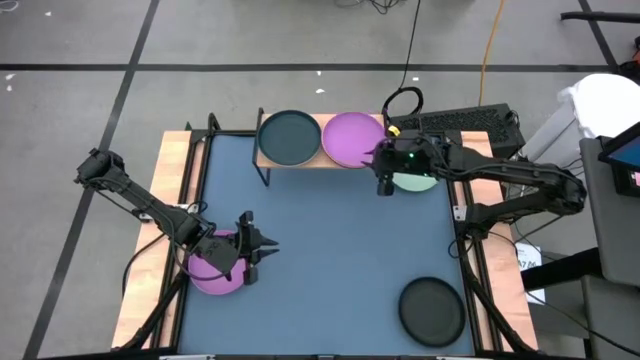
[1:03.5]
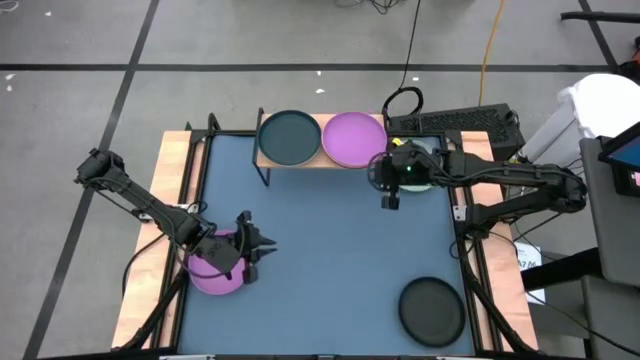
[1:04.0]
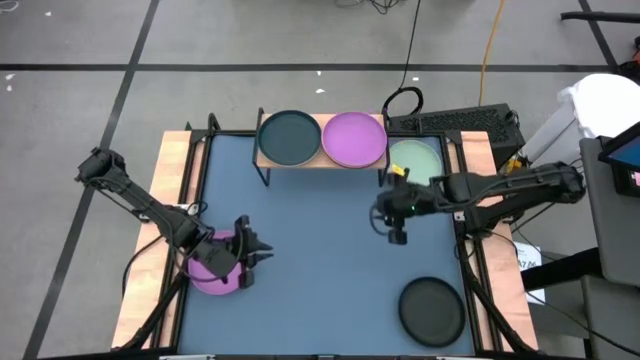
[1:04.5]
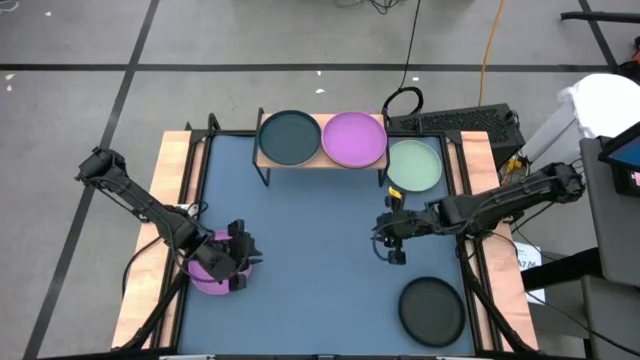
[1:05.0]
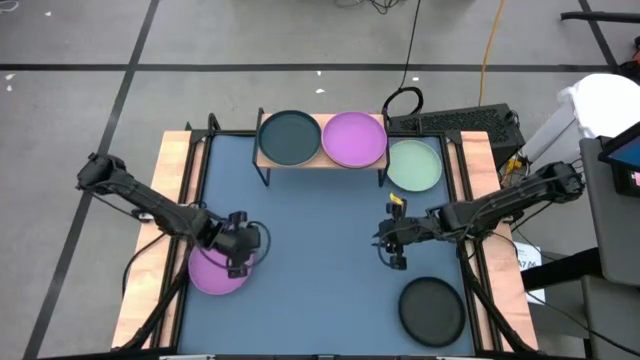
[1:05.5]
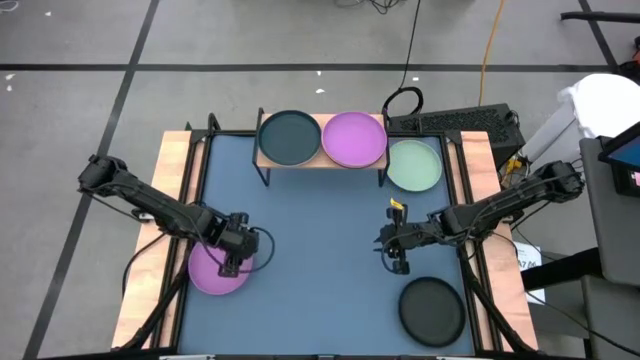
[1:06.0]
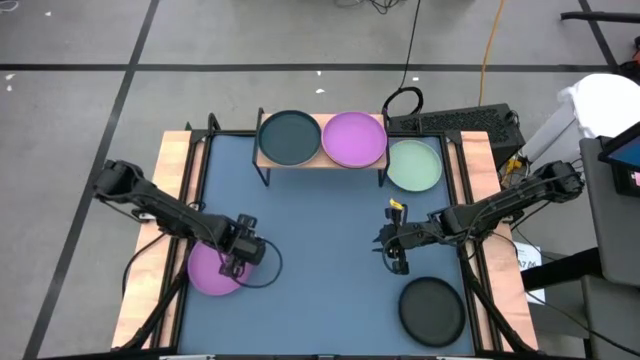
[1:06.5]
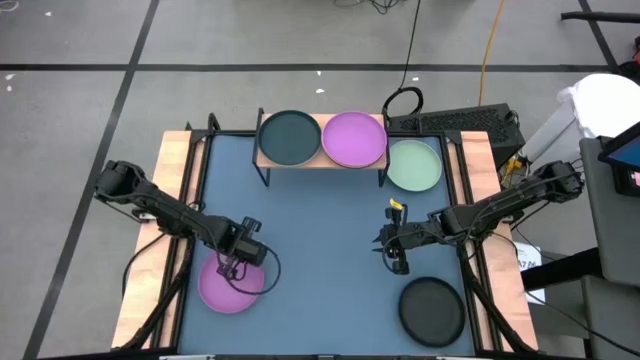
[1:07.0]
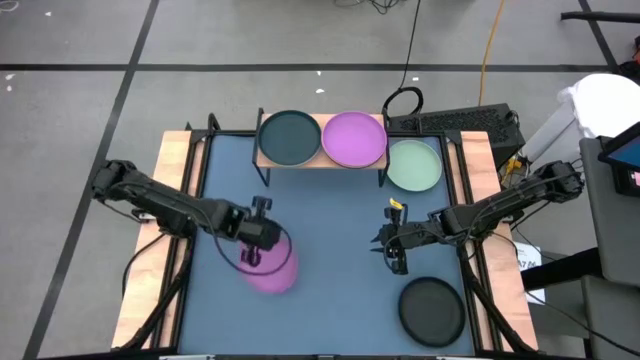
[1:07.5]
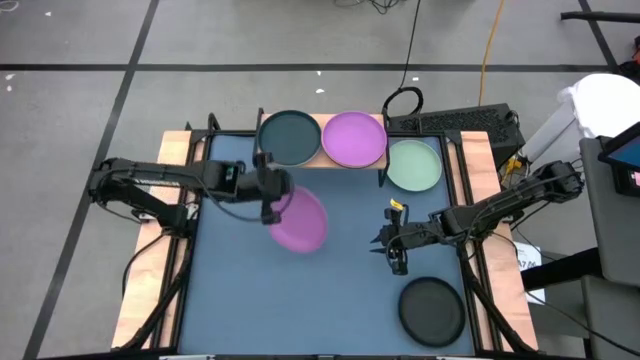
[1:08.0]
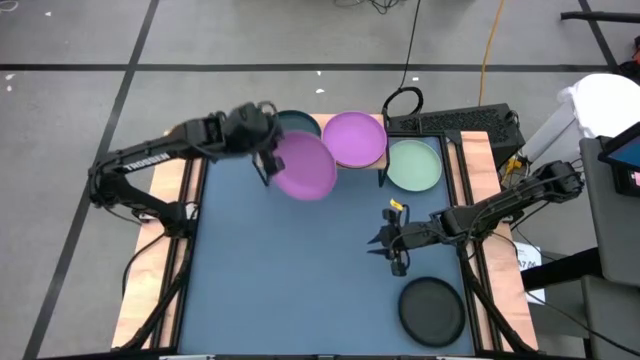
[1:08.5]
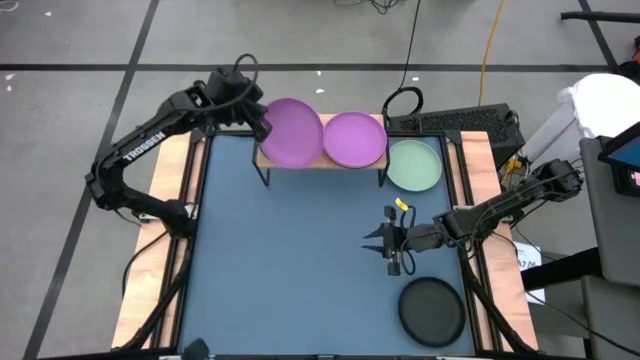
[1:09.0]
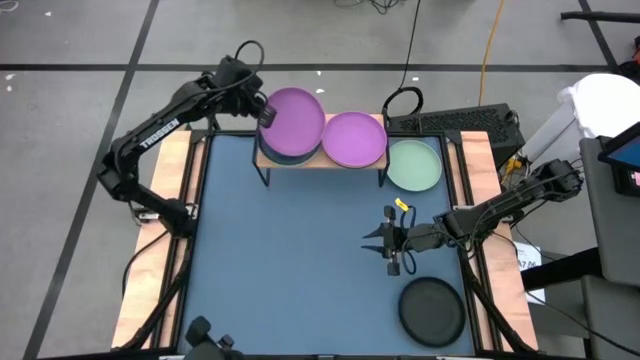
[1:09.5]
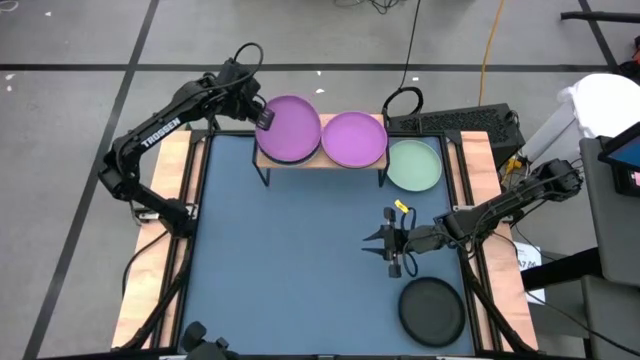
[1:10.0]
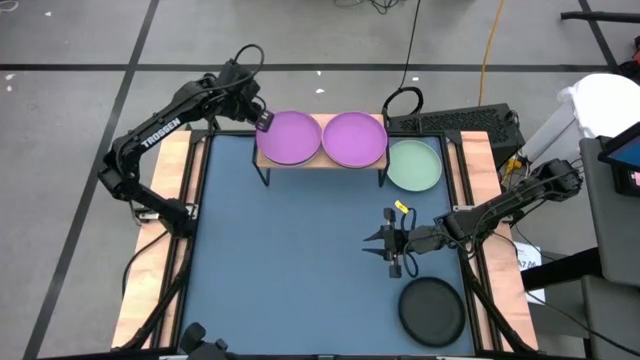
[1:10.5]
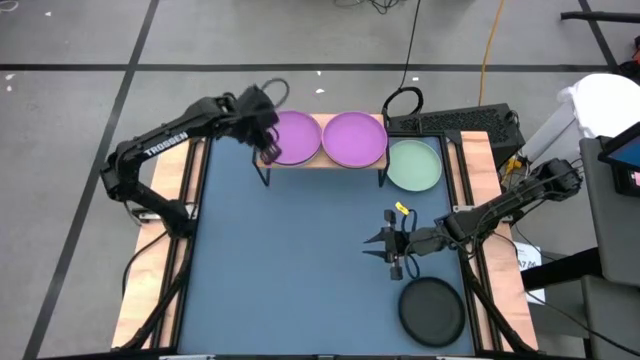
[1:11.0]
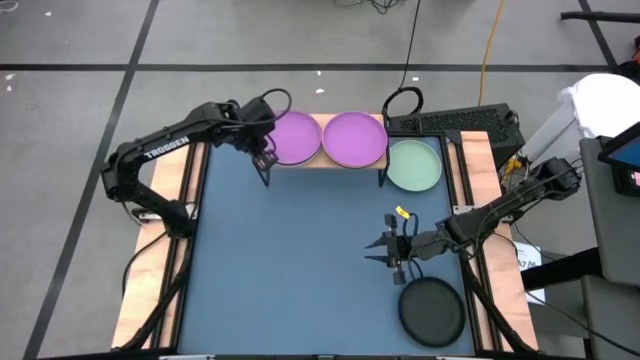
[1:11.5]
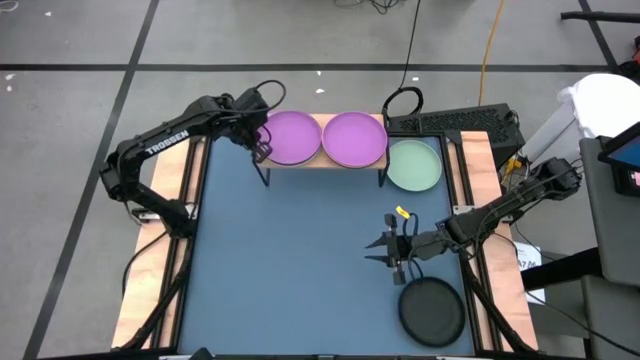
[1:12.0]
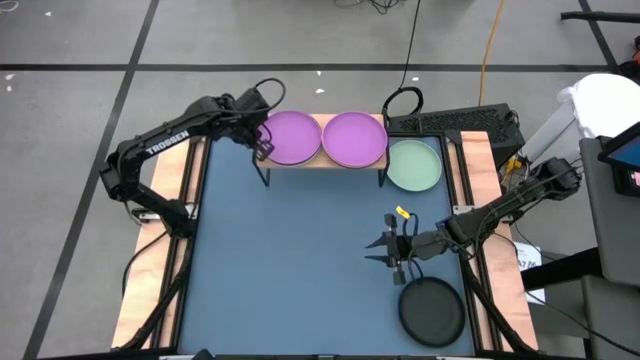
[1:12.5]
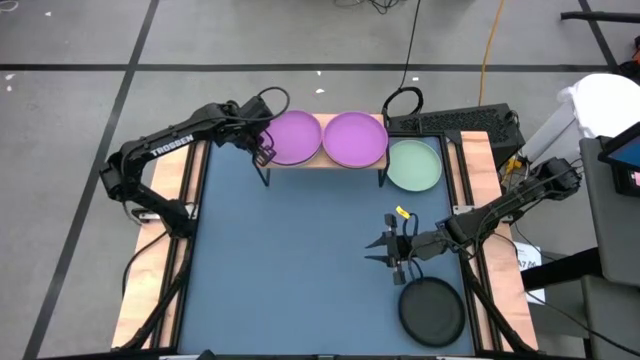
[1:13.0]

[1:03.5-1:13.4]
Task: Place and stack plates onto a shelf
Stack the purple plate on top of the dark green plate on the shelf

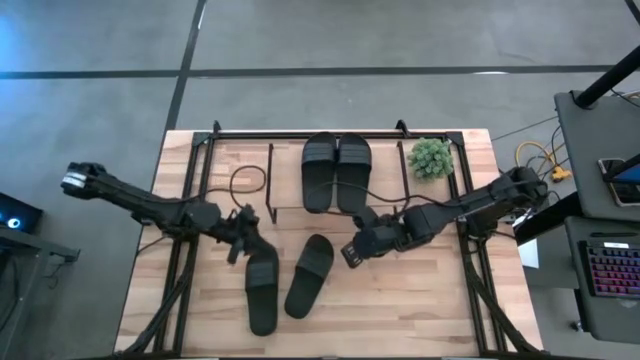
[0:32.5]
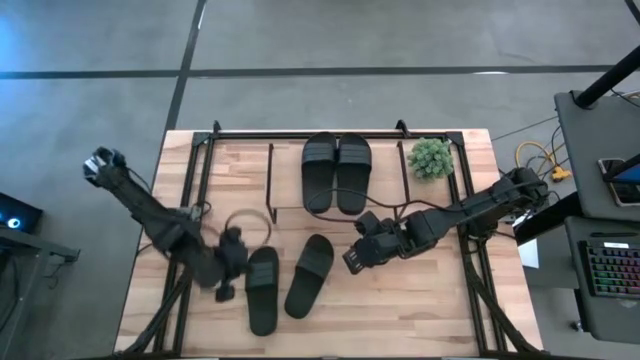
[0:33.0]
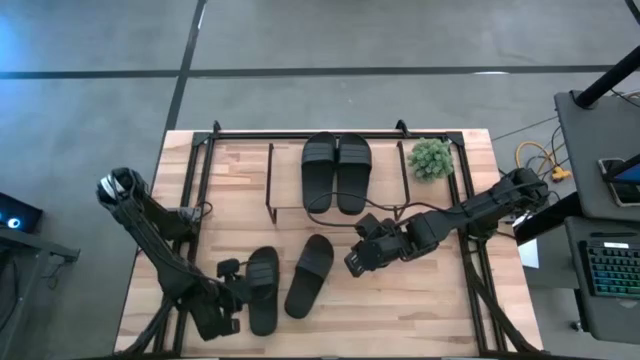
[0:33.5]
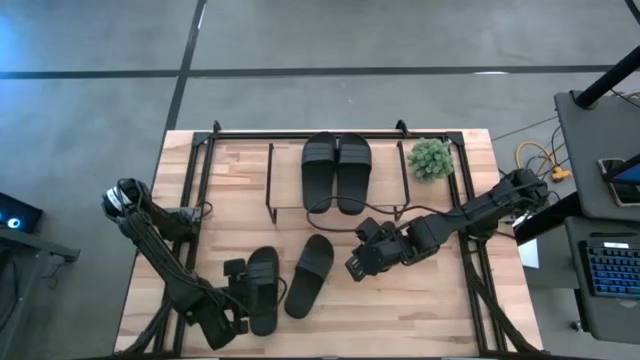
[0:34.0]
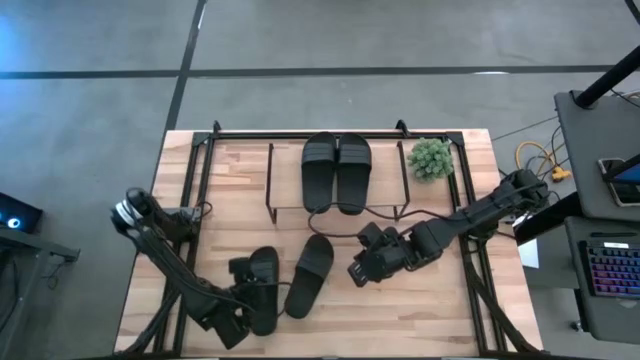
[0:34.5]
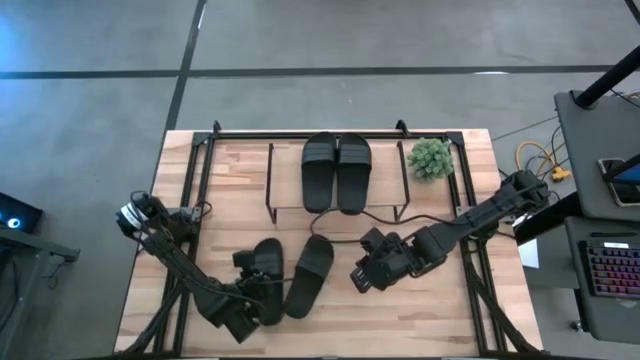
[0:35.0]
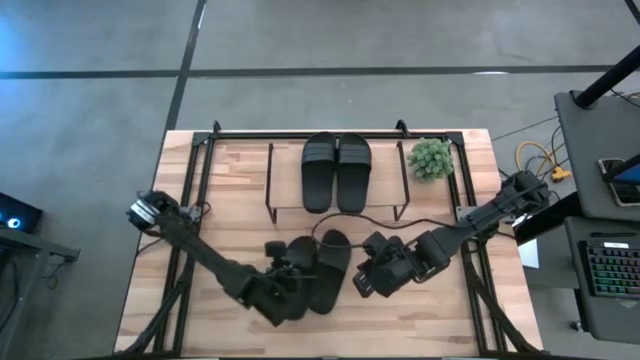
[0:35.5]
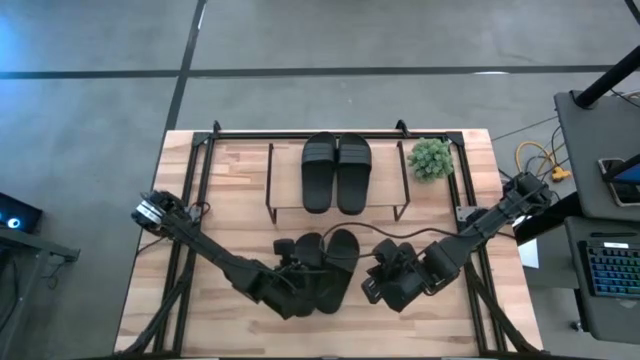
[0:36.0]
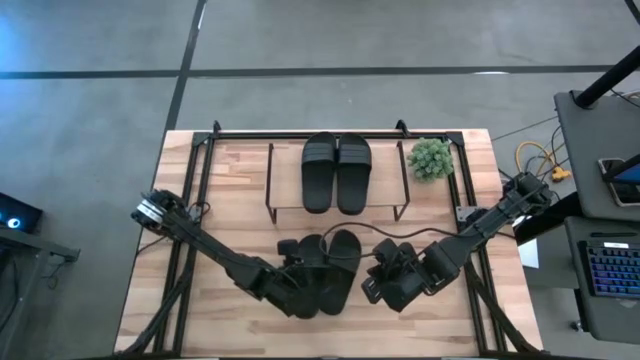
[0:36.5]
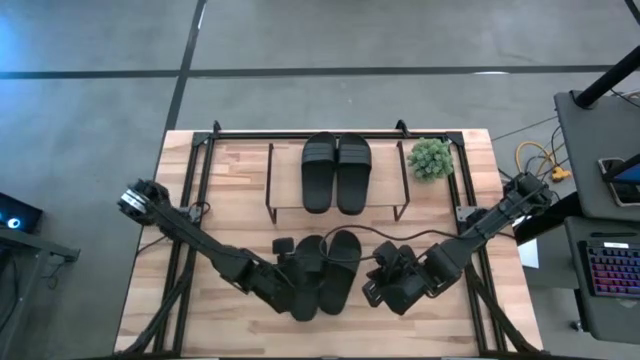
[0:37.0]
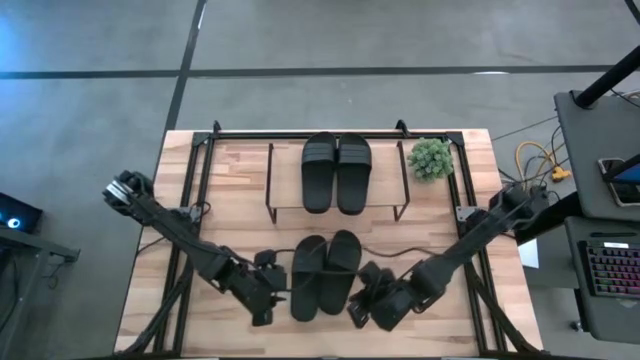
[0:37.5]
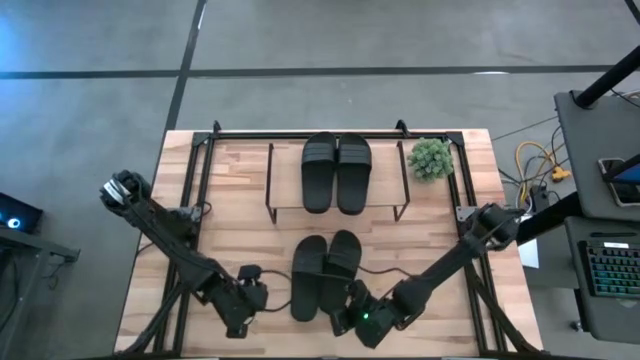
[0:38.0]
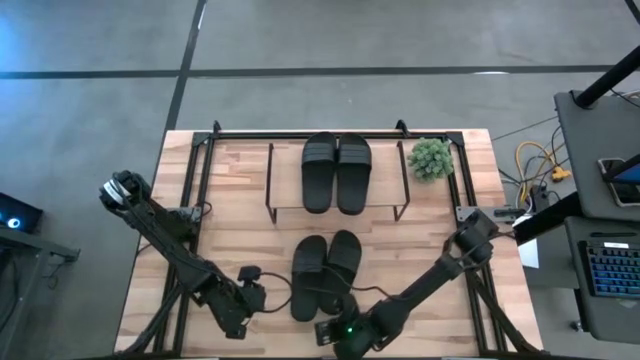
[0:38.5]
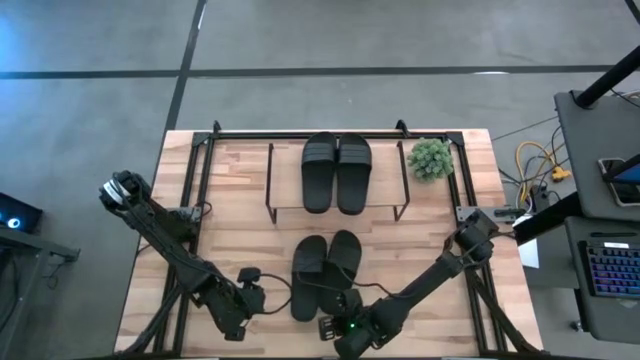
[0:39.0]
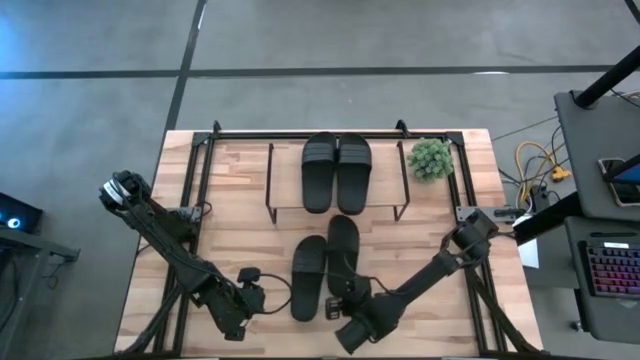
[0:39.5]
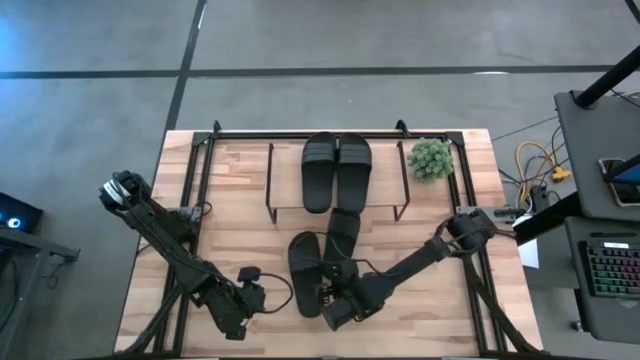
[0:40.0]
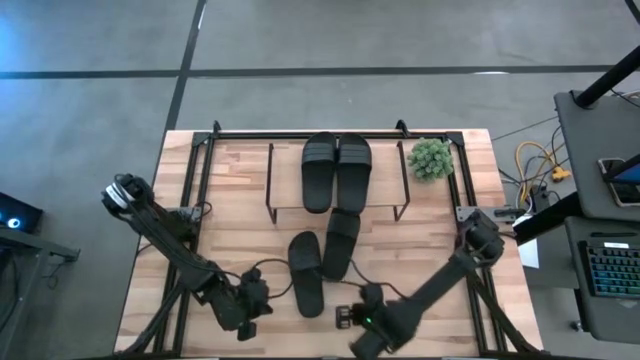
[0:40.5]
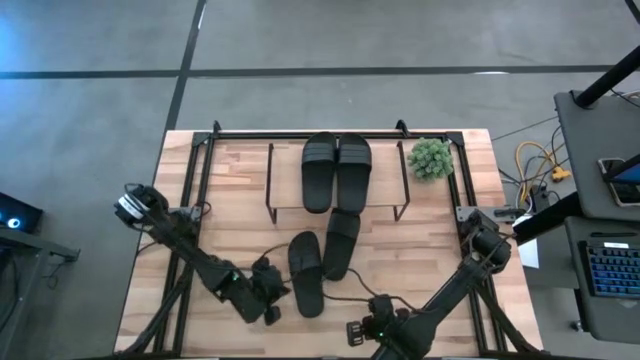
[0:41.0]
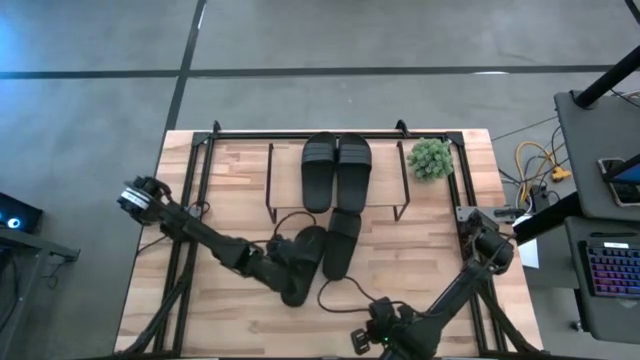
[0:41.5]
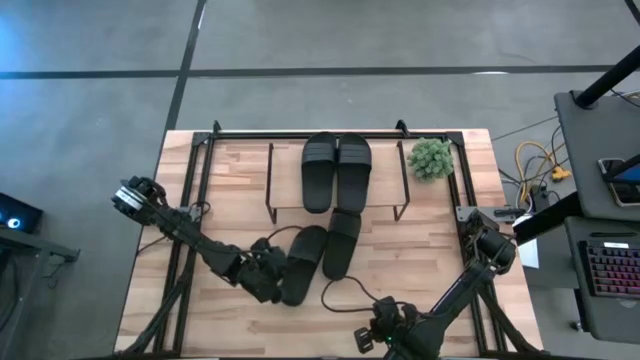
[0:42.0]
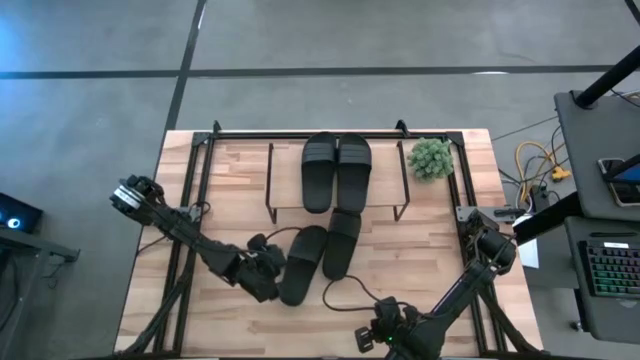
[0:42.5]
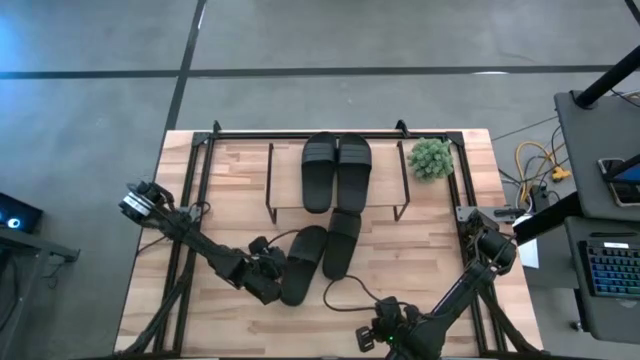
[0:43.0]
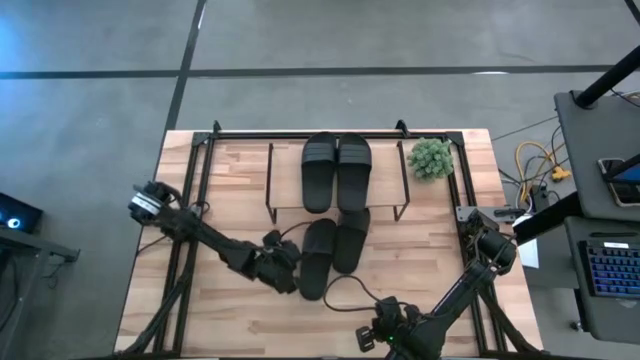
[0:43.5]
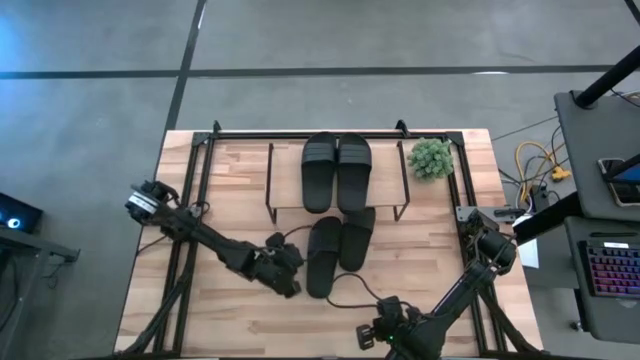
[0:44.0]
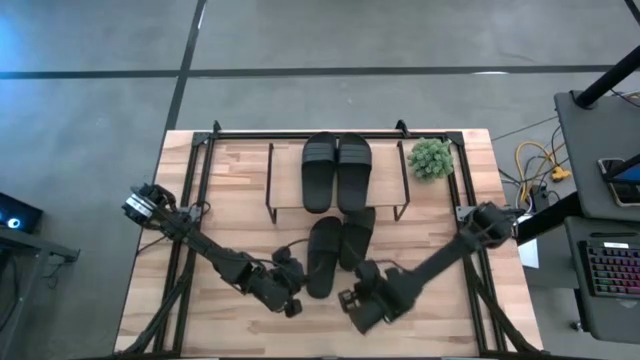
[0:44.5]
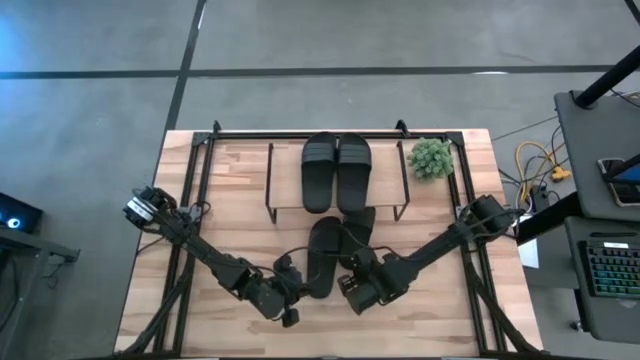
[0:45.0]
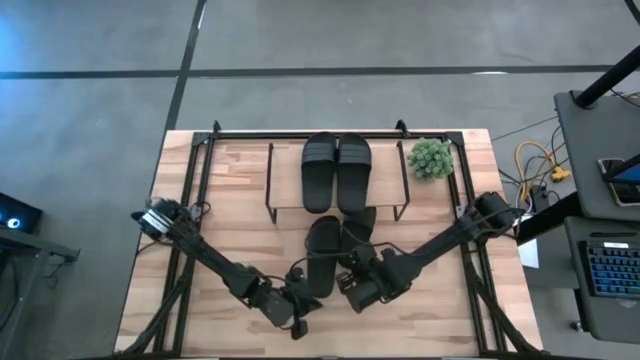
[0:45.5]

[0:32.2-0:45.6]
Task: Pick and place slides into the shelf
Move the black slides under the shelf
